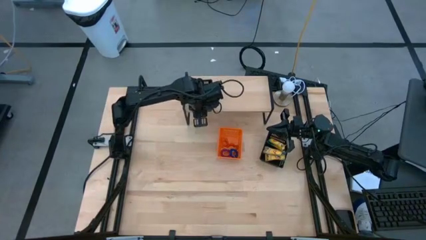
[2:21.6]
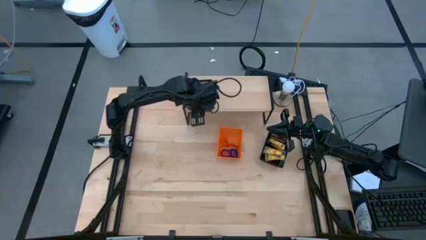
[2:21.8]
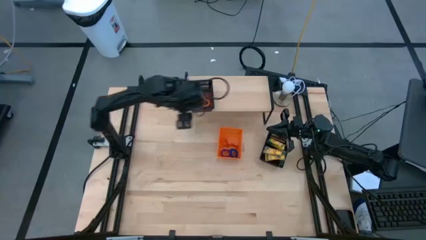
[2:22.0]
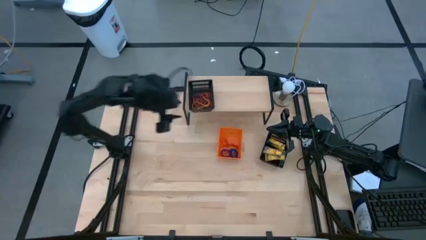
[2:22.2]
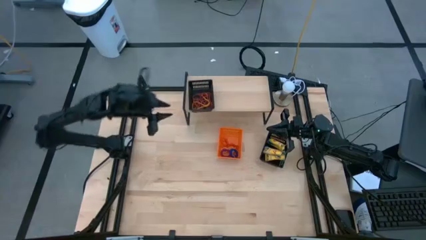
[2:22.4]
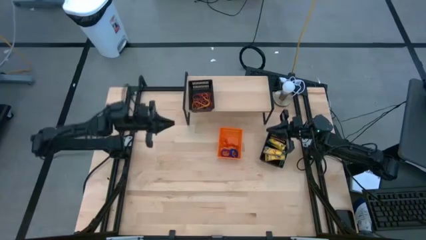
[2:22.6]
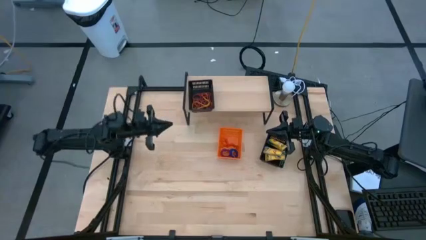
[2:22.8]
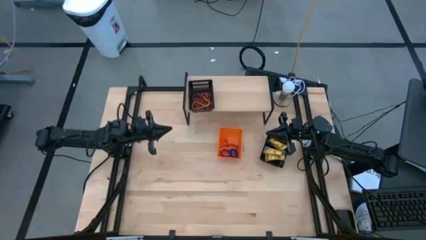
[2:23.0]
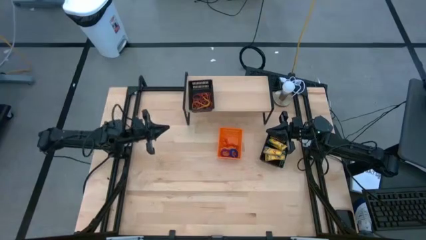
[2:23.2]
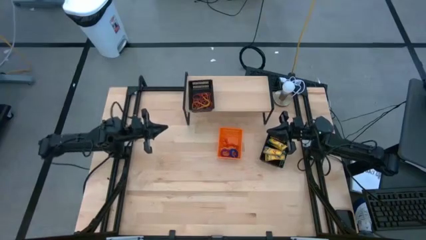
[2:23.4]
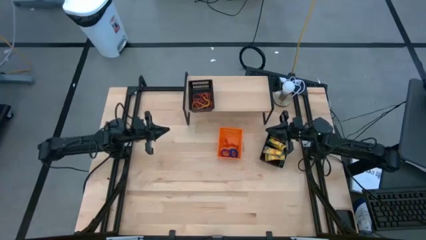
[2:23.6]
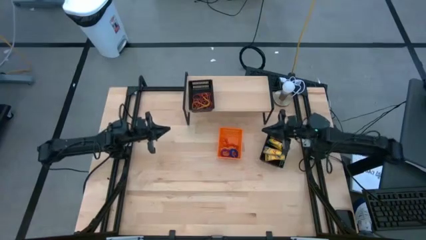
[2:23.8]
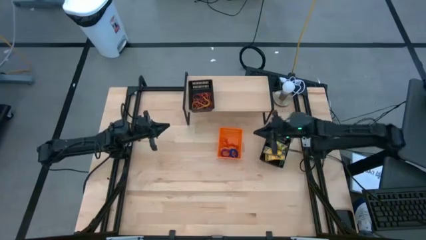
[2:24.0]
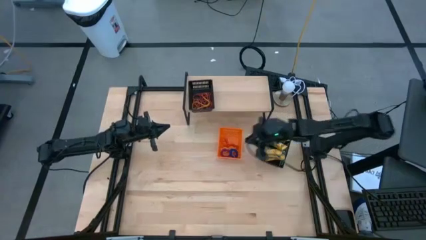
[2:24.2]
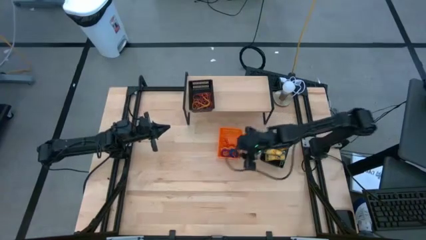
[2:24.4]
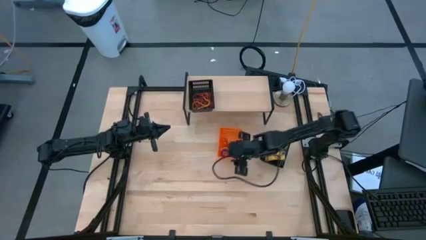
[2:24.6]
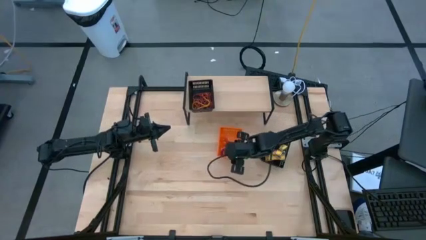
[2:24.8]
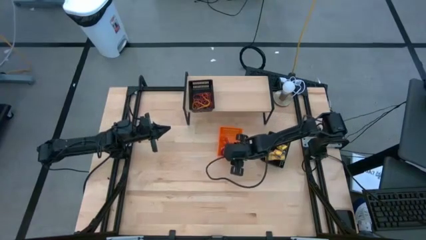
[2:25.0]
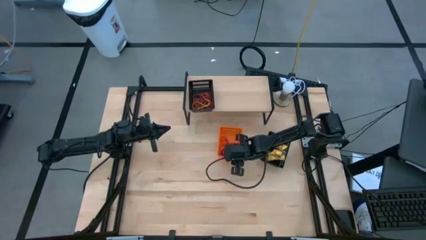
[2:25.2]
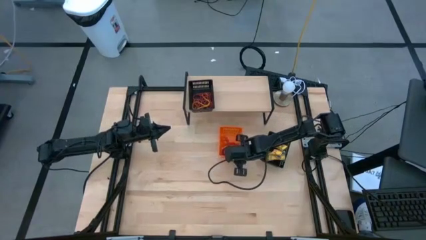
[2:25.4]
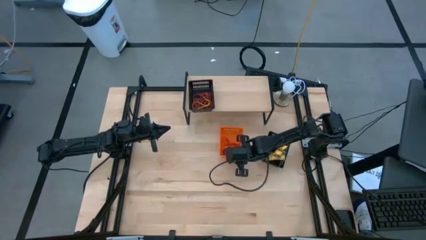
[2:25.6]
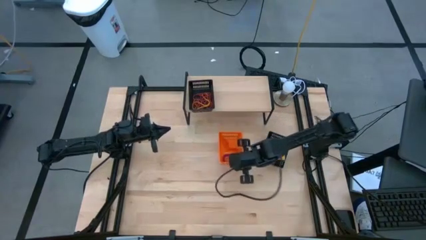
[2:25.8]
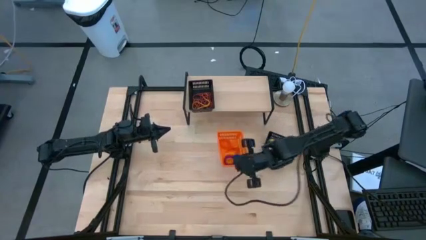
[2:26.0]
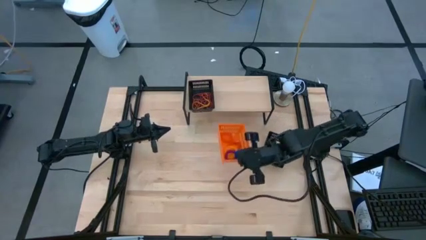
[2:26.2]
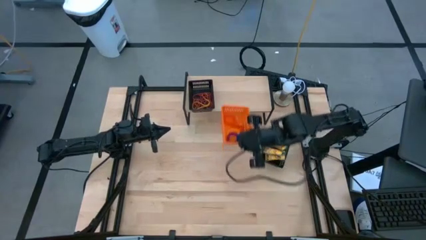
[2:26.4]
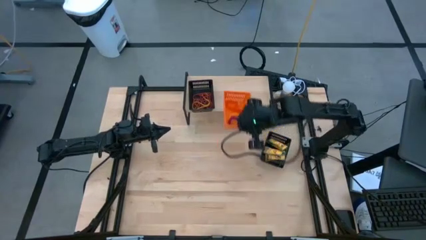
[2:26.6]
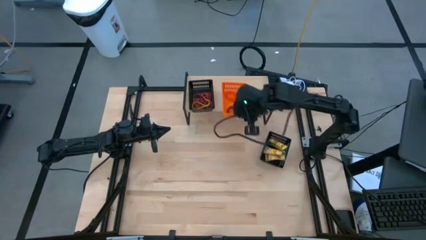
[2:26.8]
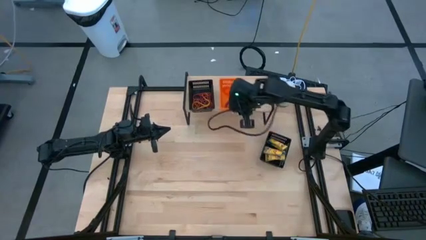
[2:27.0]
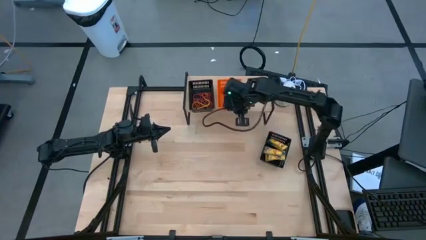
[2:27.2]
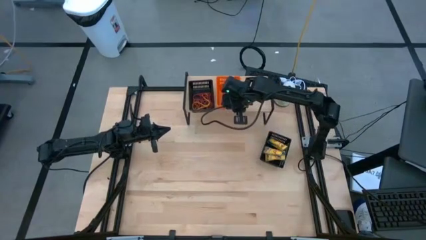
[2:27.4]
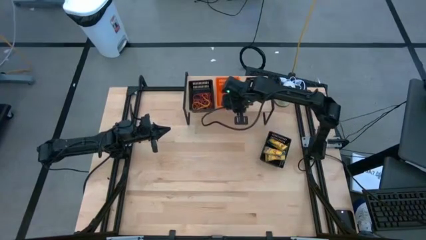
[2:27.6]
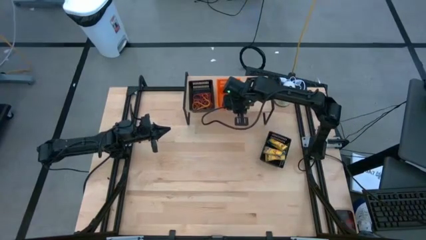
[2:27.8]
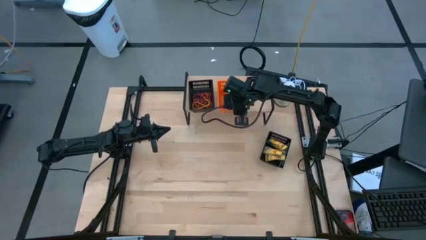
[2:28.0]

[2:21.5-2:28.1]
Task: Pick & Place Office Desk Supplies
Put the orange bin on the shelf

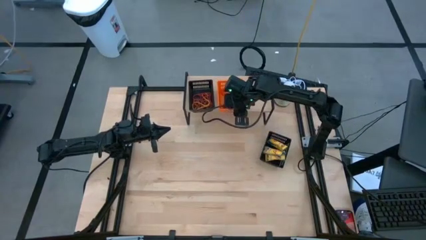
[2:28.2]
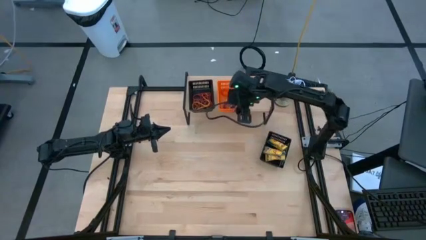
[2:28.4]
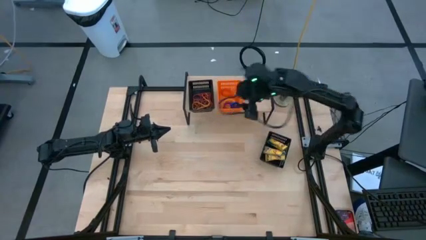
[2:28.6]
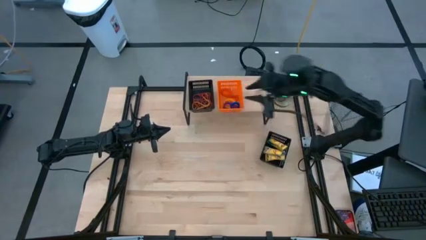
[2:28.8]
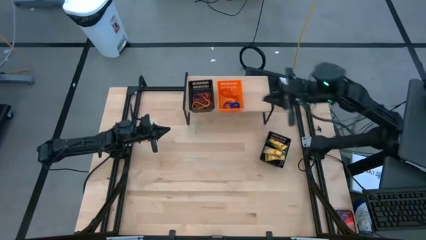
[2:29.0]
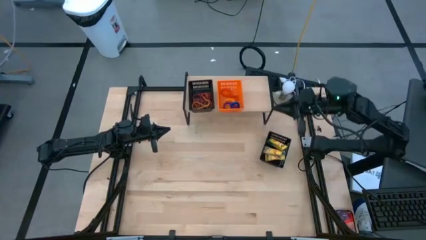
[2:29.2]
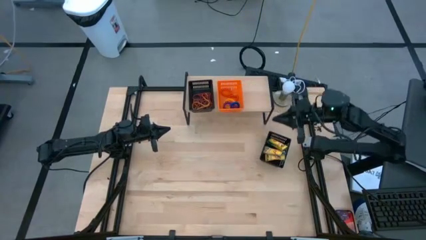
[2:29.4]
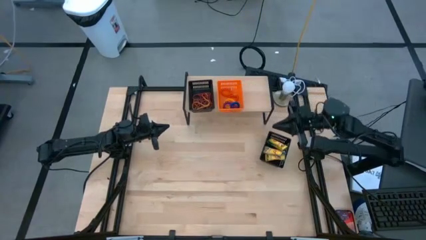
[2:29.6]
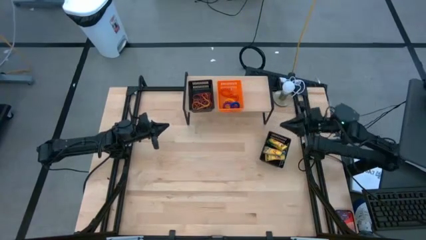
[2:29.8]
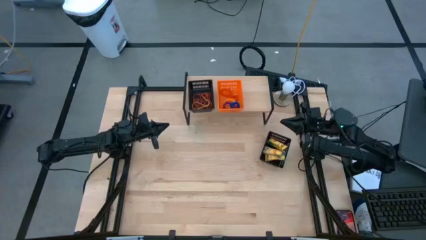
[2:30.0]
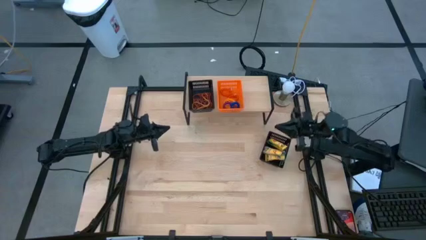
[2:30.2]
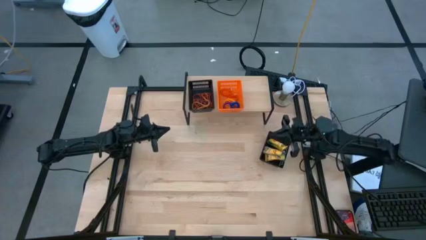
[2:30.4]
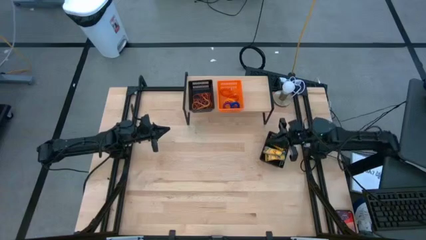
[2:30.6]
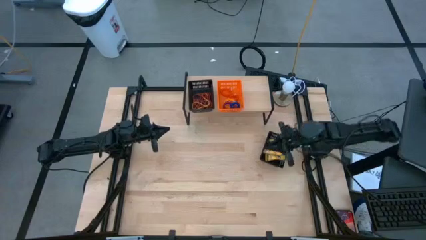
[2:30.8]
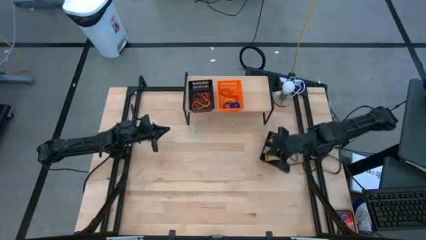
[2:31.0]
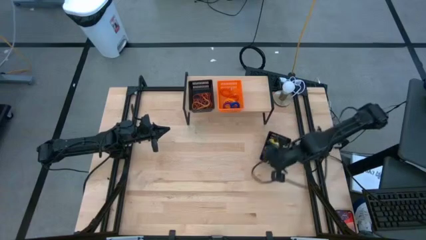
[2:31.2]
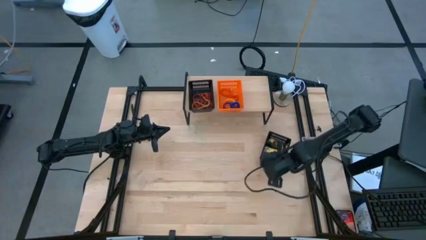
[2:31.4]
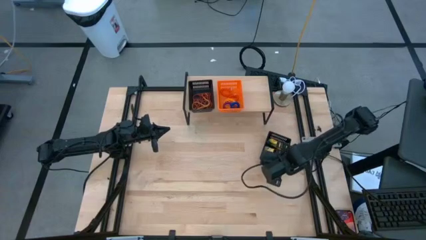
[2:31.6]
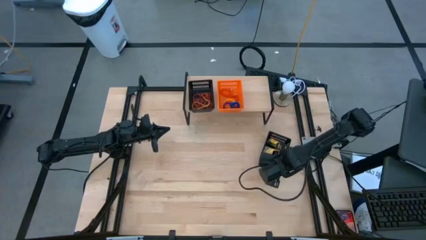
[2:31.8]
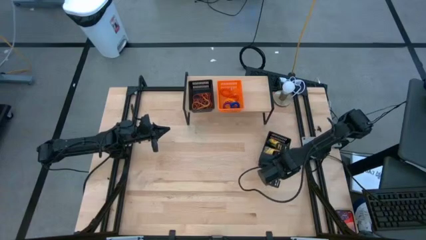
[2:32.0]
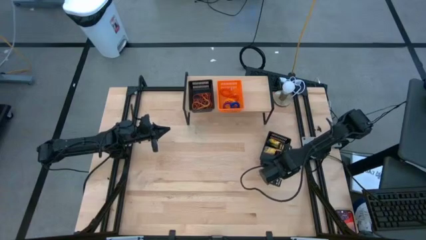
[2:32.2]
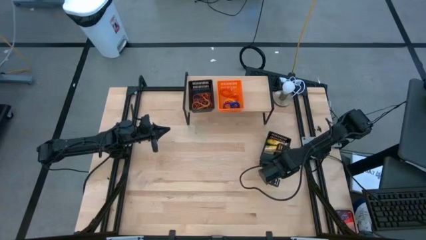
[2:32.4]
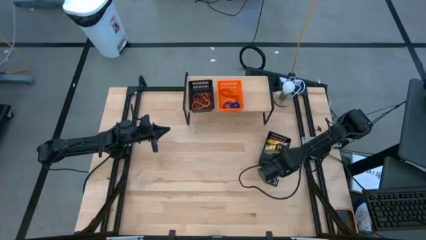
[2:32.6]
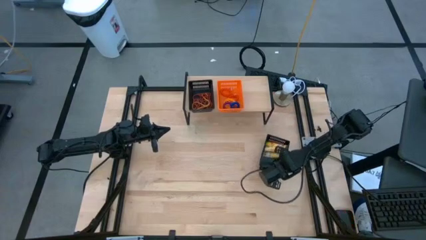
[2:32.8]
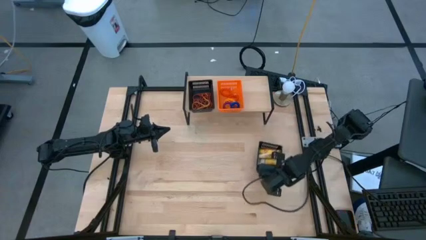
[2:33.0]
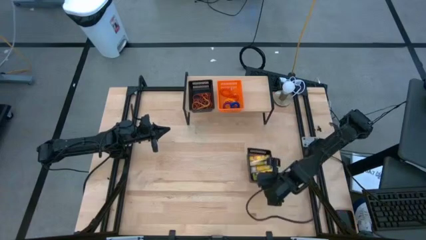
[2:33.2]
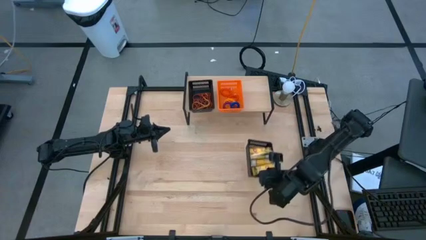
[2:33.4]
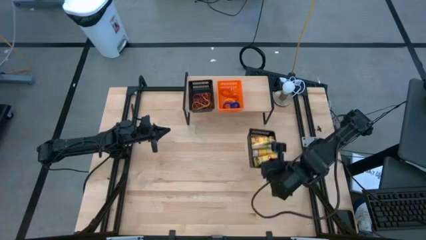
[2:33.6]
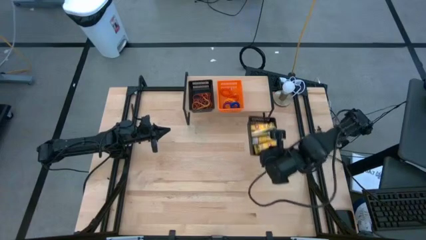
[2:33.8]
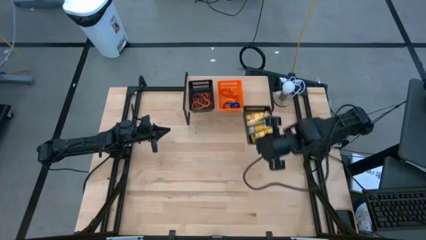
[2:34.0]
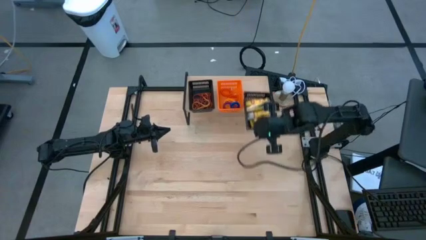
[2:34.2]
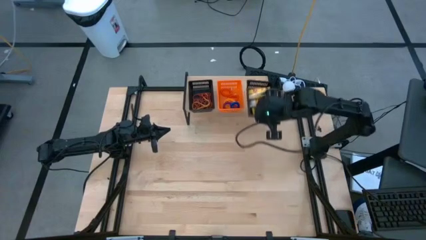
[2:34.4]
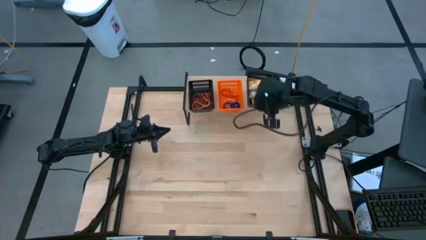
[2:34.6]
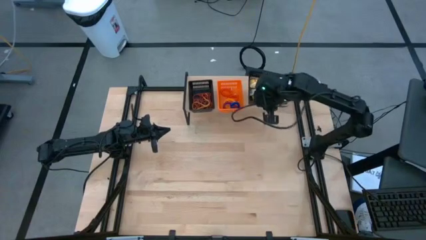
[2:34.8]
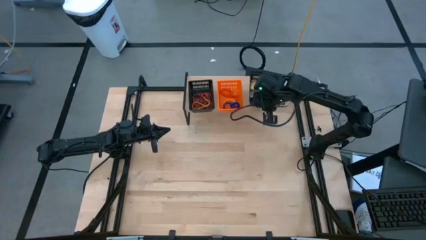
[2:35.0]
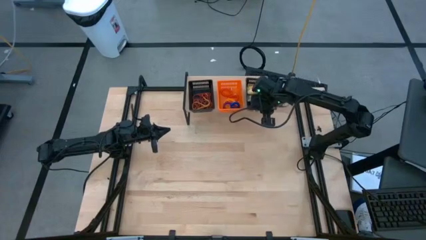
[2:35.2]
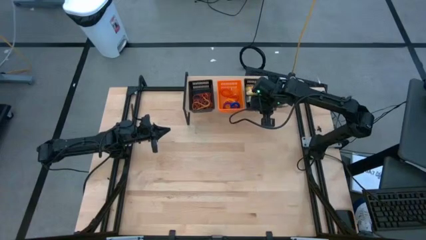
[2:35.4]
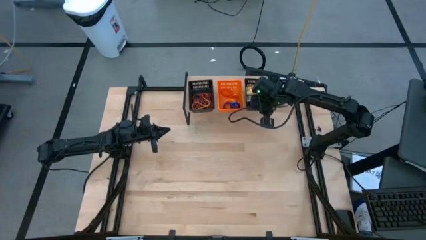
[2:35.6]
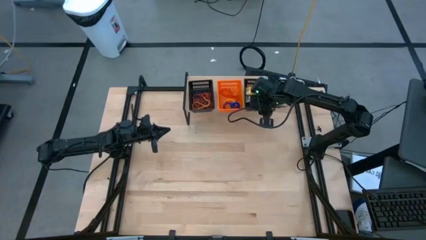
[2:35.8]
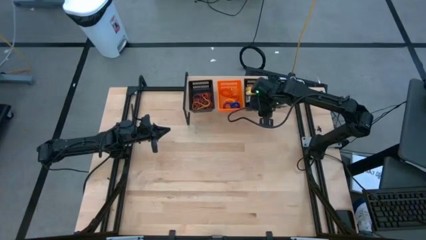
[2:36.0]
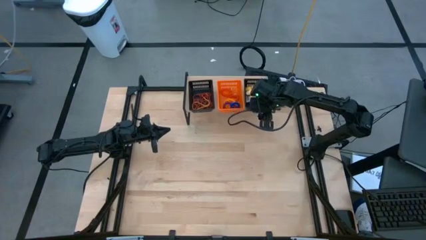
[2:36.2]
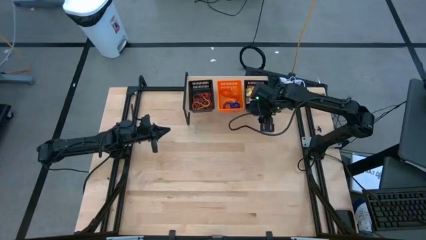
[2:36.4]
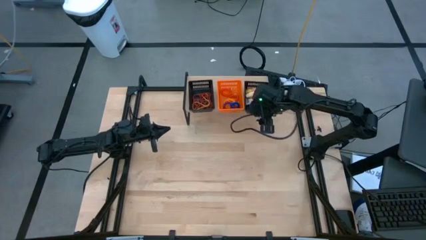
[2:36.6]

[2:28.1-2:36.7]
Put the black bin on the shelf

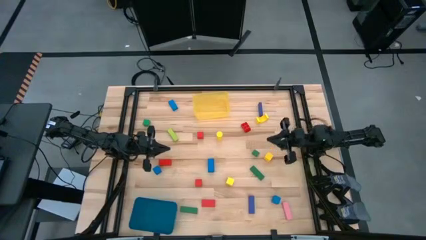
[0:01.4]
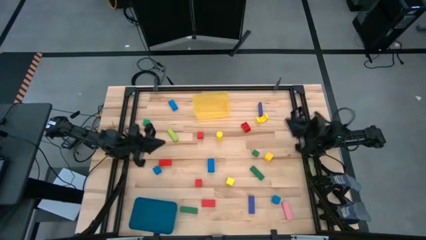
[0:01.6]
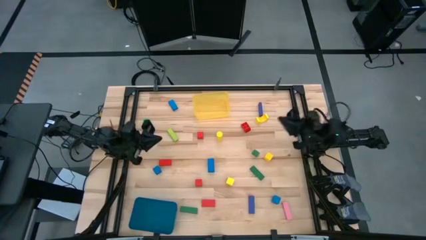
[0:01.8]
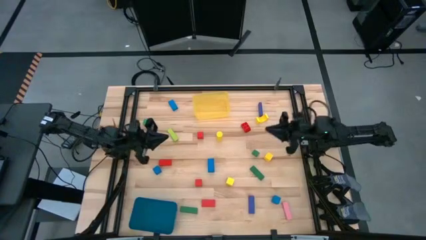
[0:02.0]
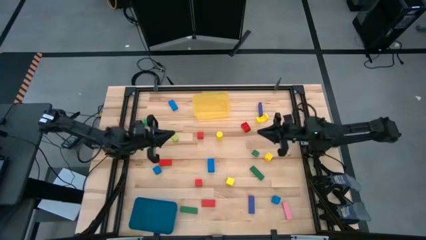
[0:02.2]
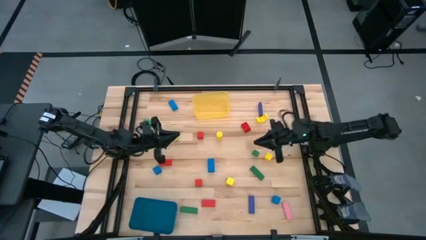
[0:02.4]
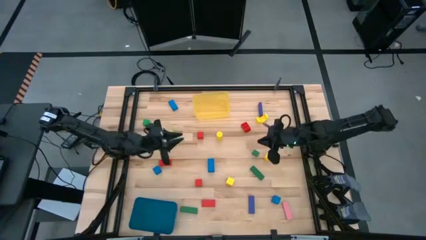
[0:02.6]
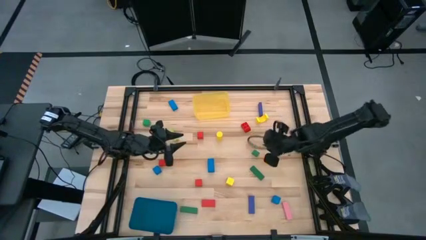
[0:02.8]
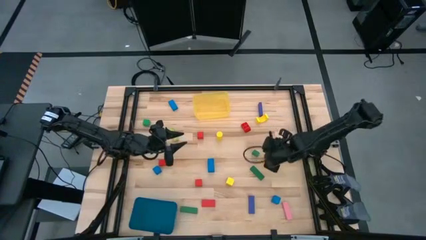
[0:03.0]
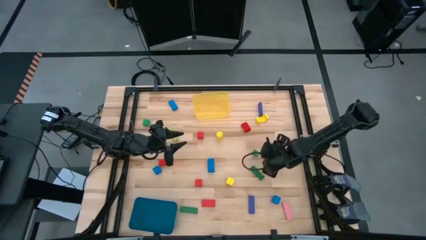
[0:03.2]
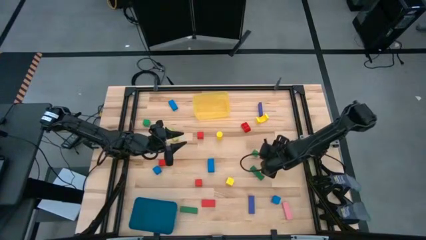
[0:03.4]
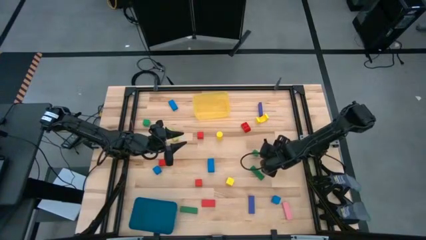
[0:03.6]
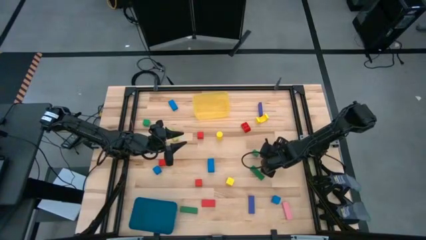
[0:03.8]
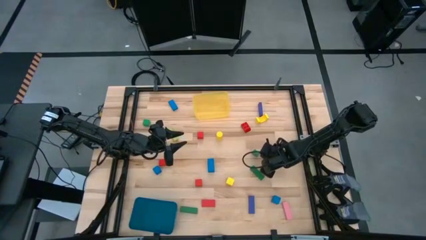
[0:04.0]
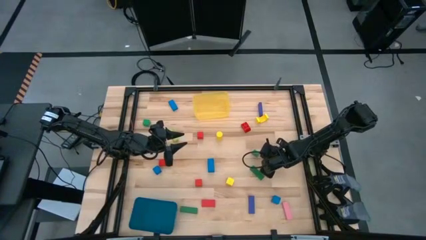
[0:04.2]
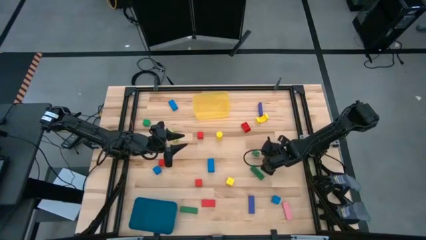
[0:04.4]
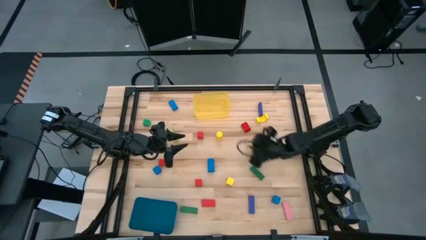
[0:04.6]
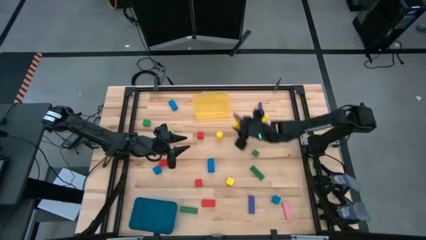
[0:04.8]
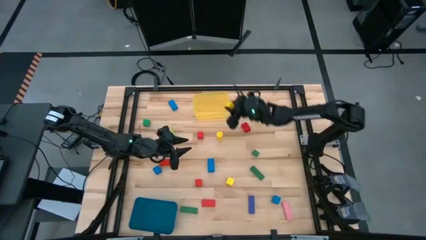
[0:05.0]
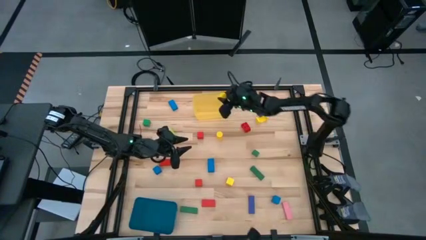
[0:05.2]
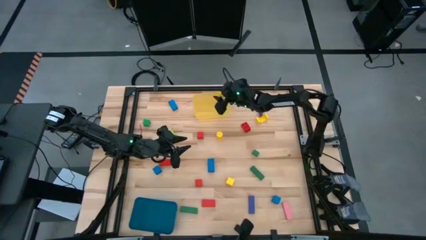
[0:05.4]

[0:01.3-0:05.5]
Task: Sort blocks by size
Put the yellow square block into the yellow bin
